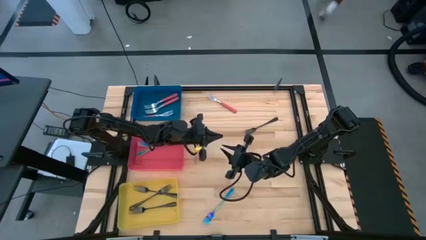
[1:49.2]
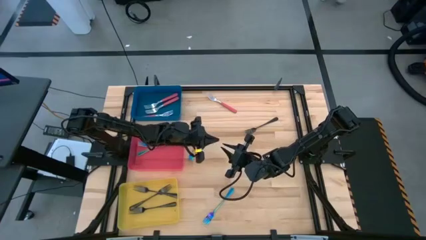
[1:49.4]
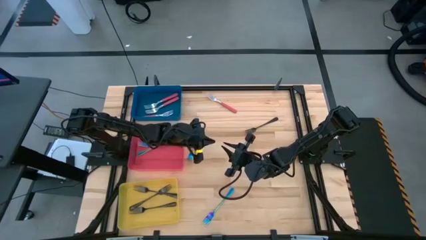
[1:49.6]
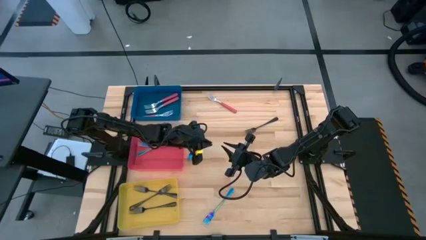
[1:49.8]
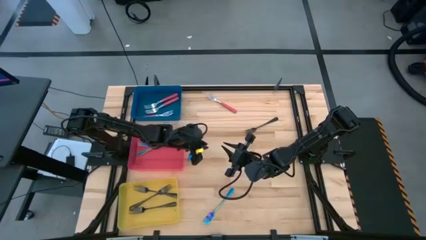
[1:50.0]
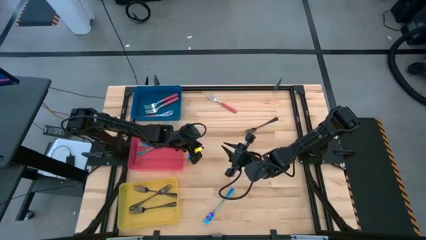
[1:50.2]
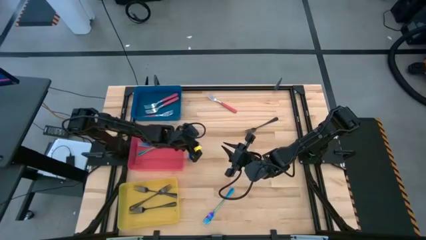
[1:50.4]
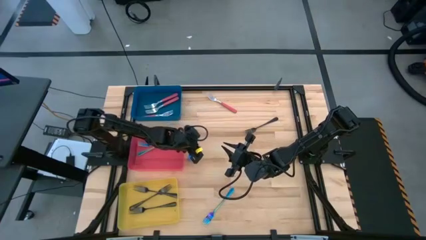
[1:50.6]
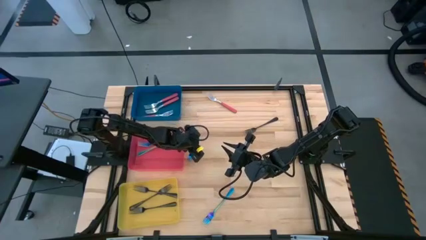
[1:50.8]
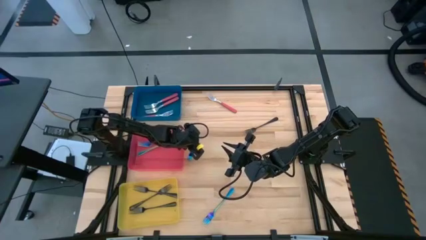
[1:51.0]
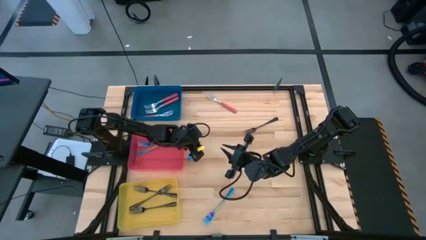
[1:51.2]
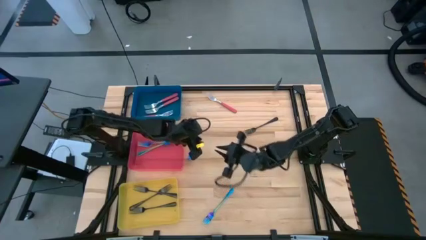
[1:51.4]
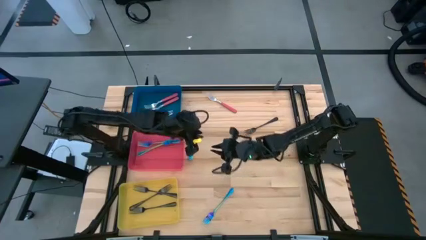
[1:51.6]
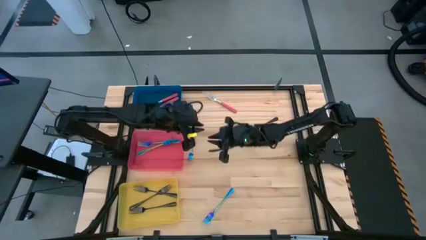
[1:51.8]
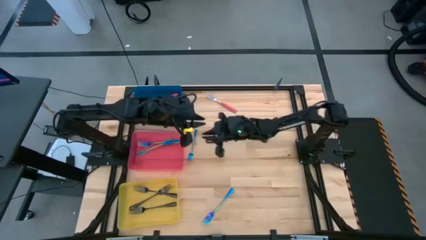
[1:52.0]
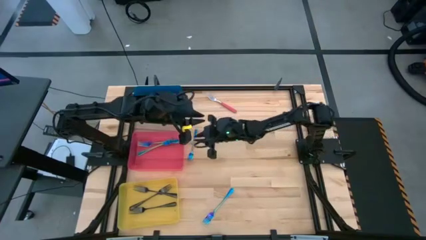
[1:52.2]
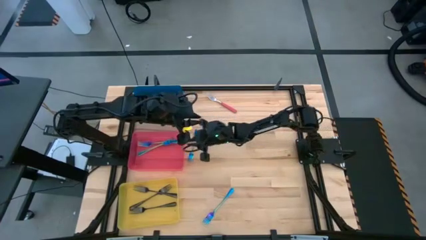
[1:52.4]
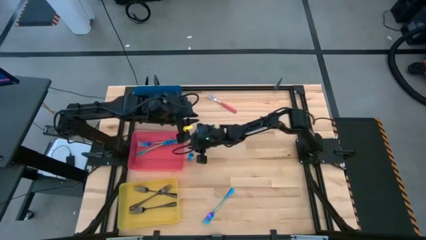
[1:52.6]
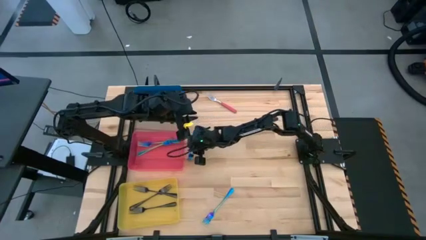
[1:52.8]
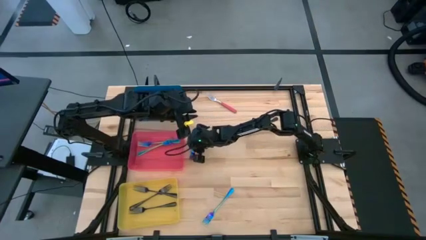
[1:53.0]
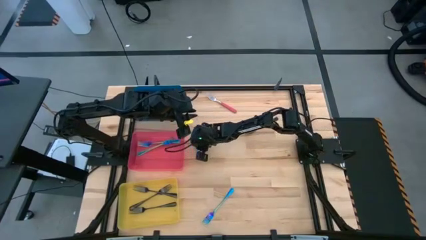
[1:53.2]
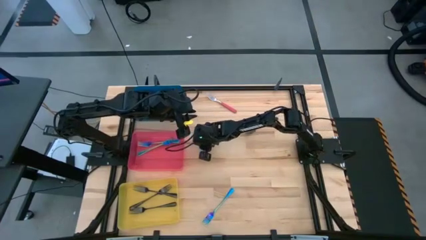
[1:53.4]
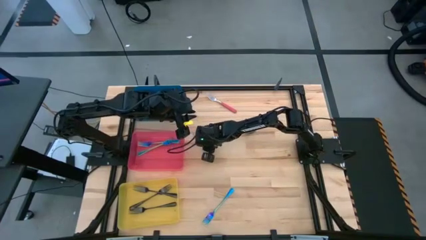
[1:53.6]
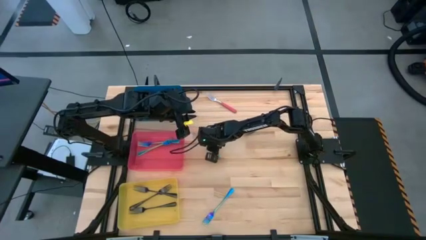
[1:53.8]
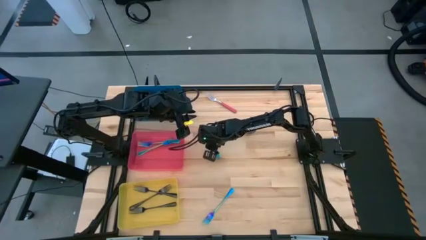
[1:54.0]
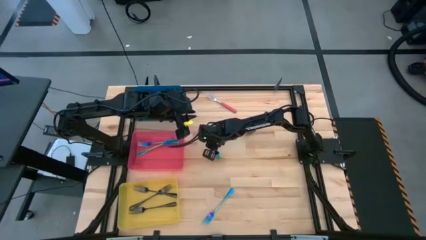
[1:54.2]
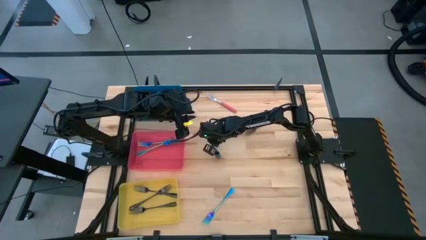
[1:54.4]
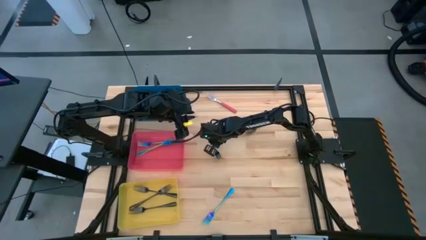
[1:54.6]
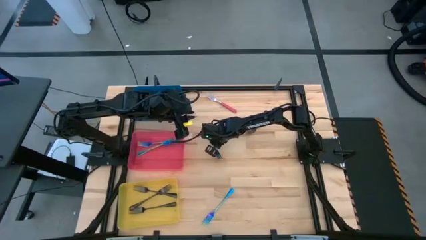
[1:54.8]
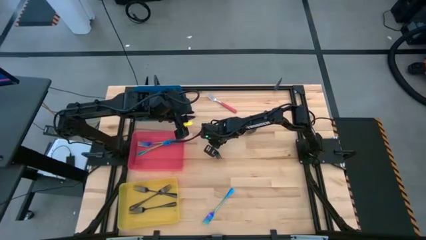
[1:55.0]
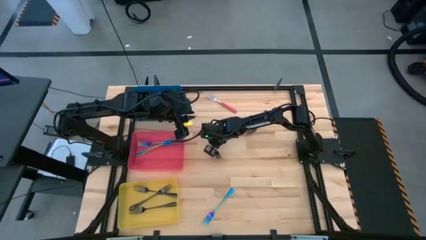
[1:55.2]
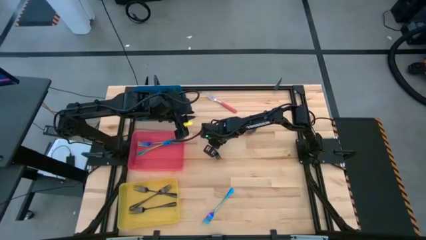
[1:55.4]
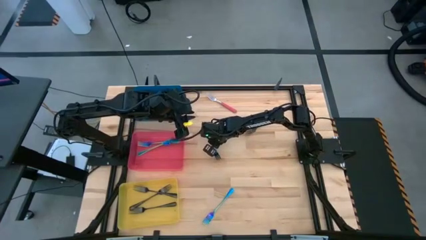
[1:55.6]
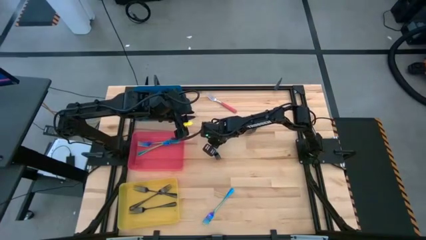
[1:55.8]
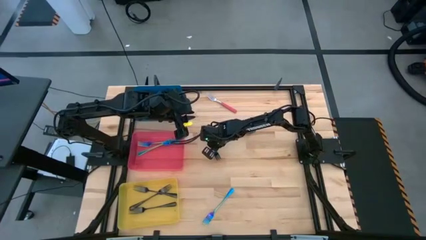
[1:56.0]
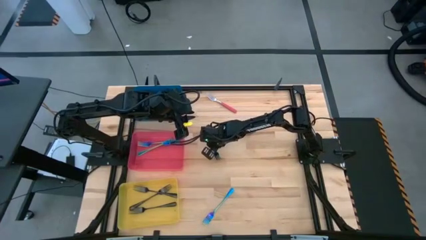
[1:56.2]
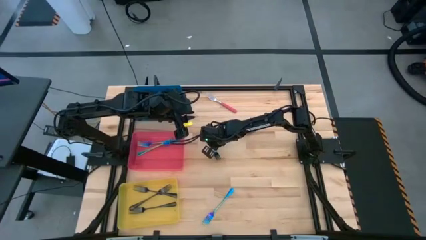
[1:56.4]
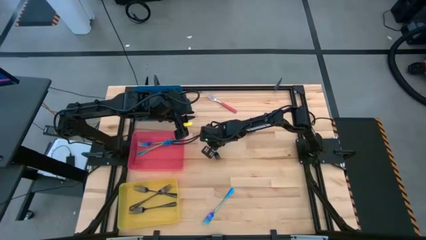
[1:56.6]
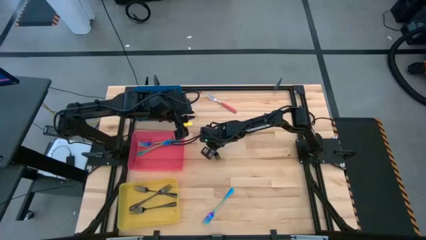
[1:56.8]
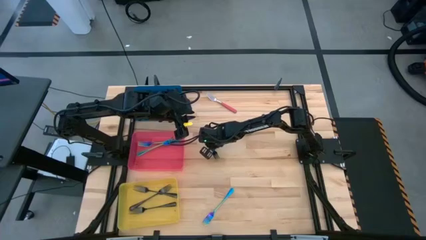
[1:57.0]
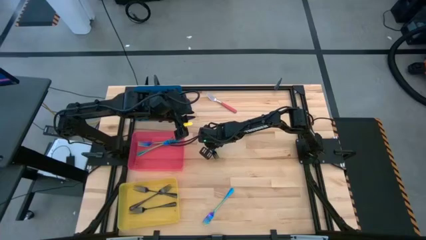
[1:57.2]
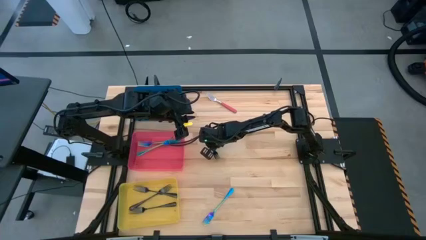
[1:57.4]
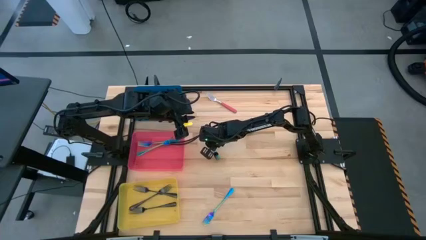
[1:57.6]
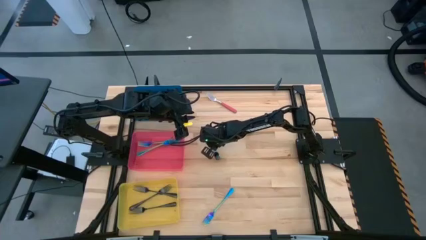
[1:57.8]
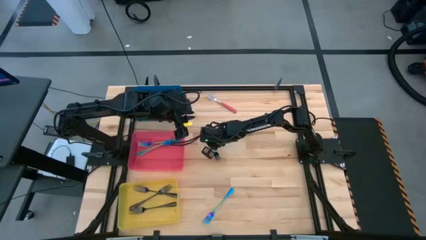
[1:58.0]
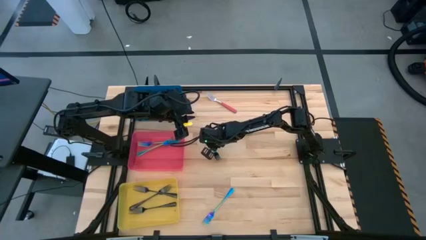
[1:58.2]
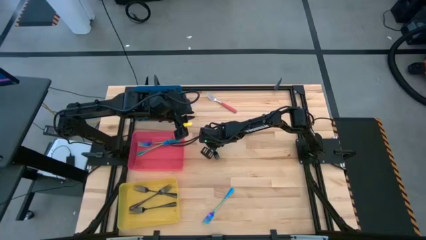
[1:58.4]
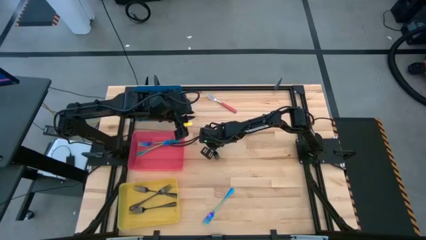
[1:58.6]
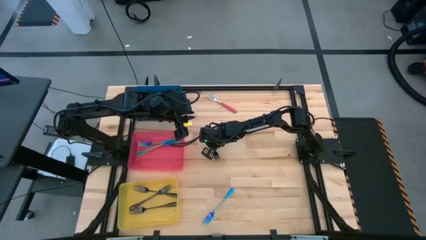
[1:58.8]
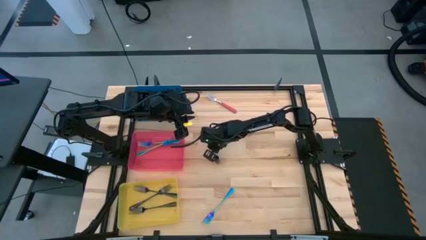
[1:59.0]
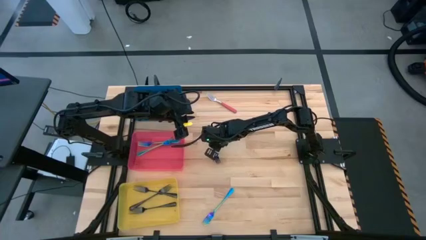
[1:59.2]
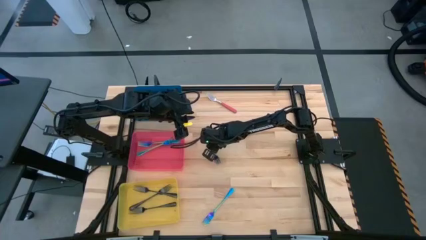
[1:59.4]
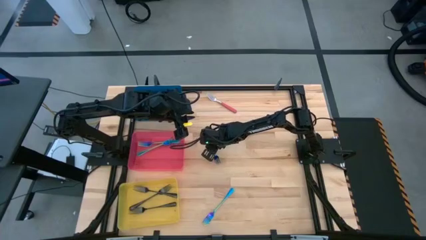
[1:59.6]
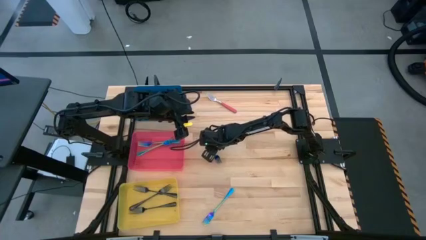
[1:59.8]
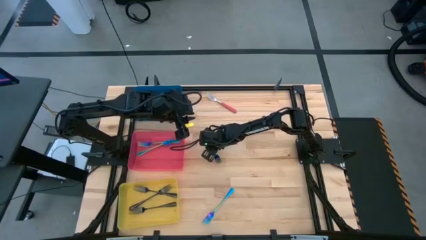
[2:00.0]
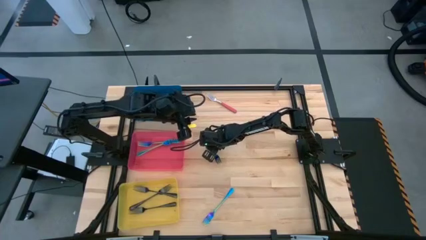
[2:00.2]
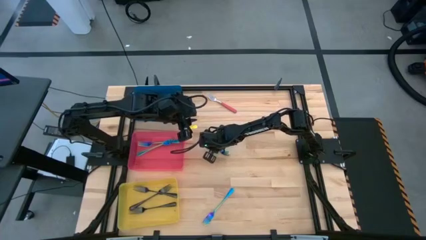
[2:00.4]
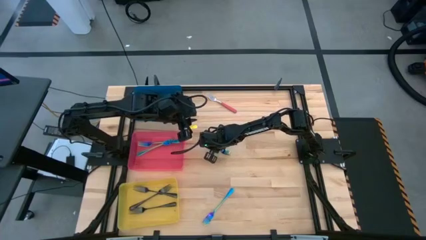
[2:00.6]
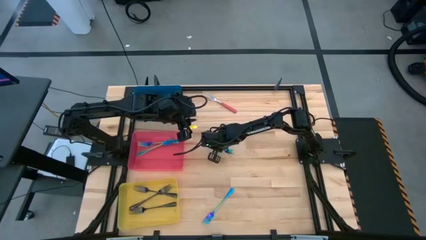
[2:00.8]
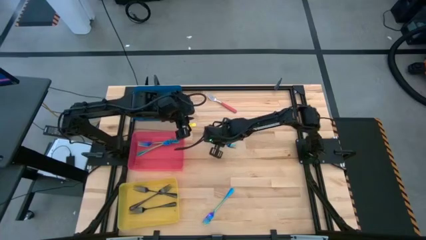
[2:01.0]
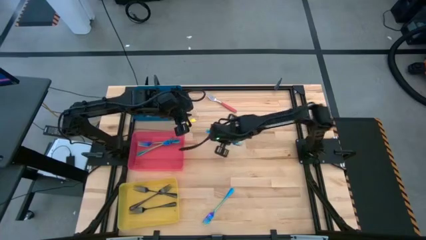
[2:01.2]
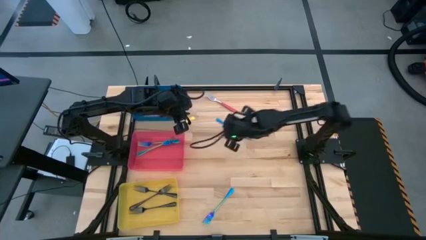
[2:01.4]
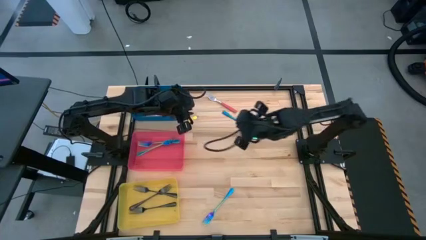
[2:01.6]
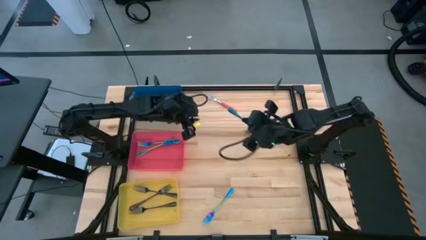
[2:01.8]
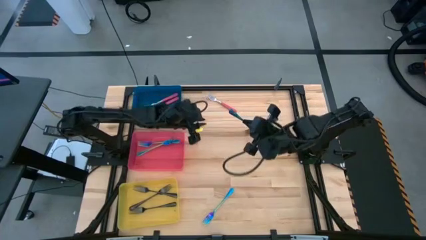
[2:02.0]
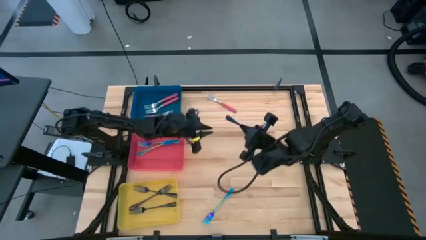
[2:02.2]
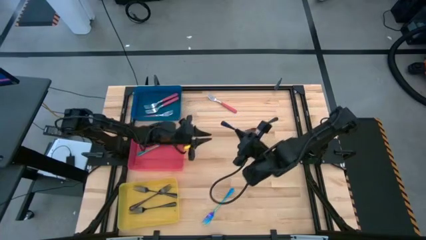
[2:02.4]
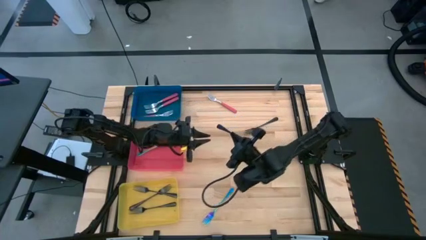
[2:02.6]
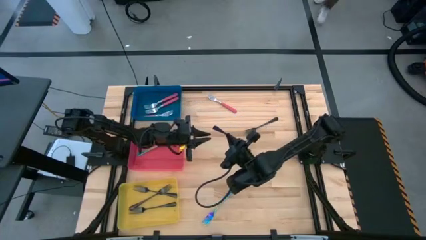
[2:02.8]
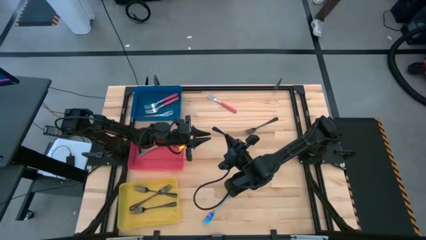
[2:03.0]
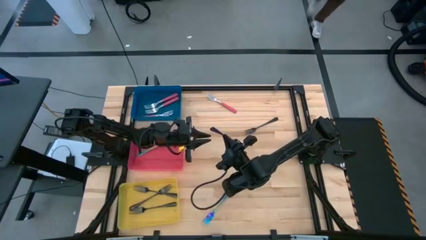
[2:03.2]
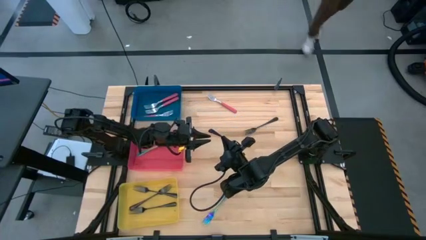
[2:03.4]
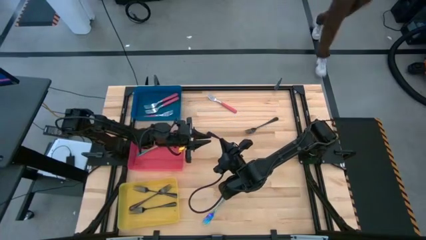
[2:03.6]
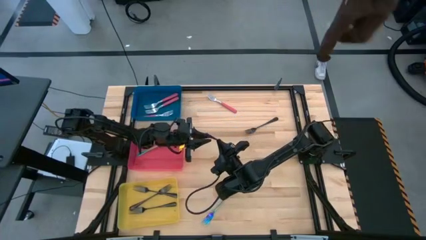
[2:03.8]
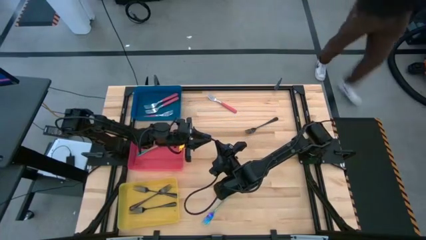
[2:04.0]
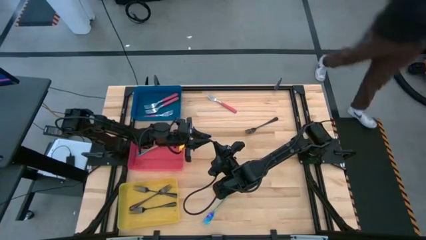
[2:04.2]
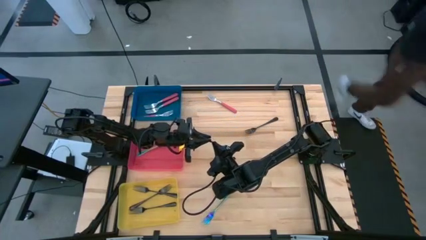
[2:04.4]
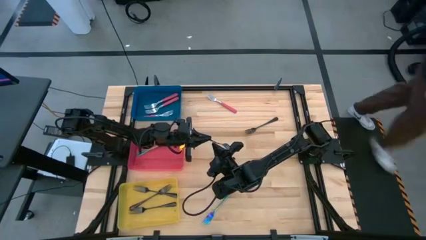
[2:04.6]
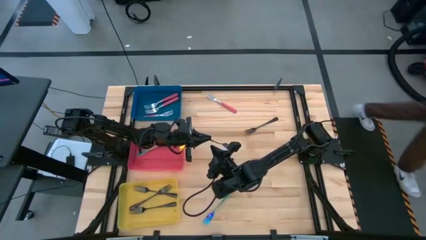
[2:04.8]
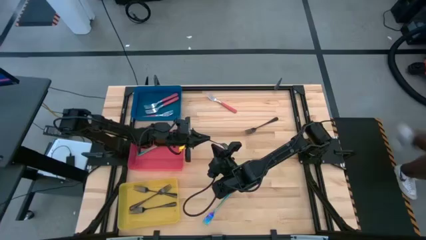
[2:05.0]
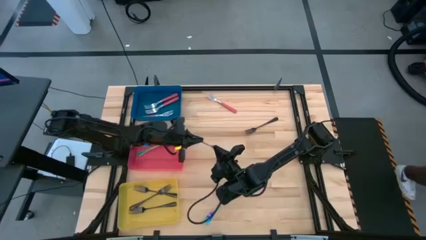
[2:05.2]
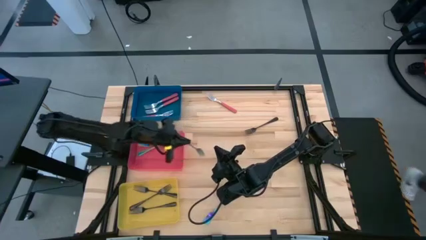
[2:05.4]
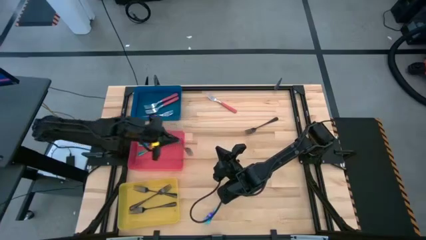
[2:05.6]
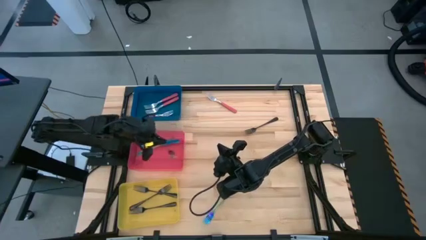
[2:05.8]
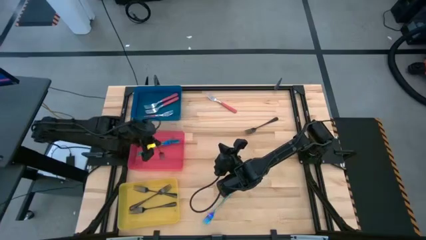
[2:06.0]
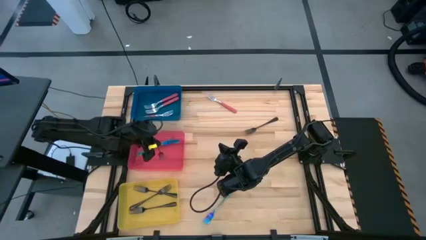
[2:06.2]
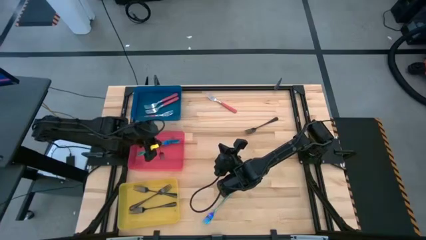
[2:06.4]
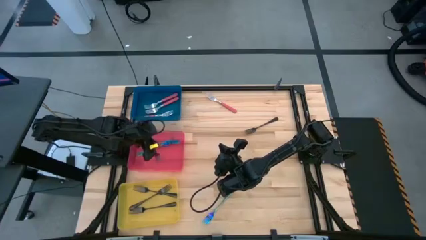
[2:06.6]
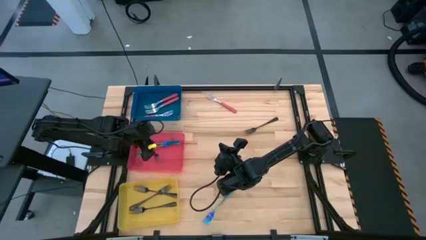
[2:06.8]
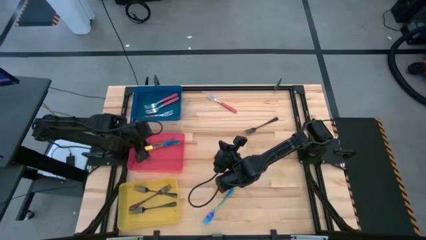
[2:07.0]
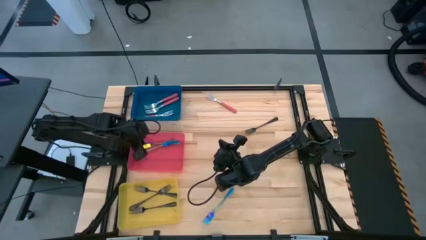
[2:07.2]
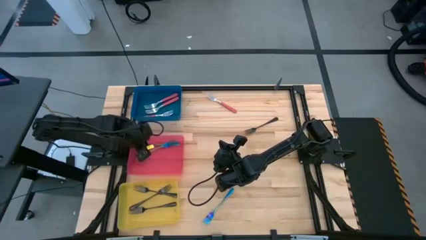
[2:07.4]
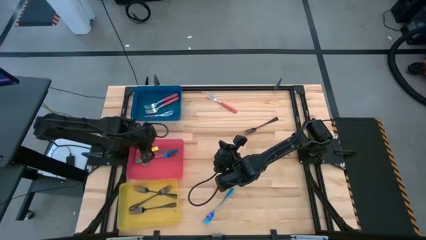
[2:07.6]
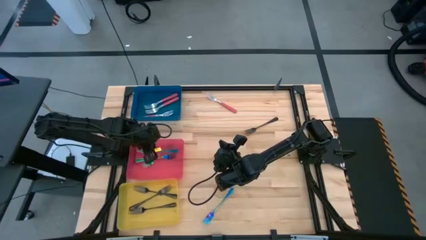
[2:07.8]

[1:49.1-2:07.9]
Task: Sort silverware by color (type)
Put the blue fork into the pink bin
